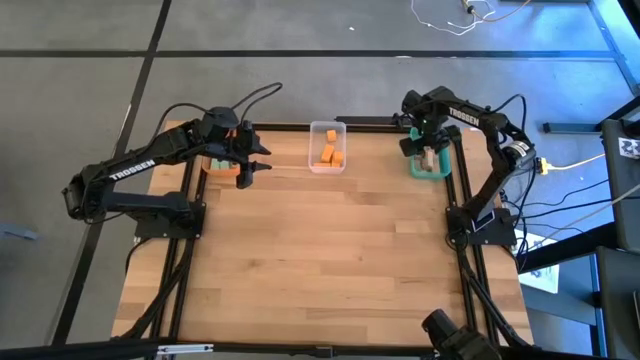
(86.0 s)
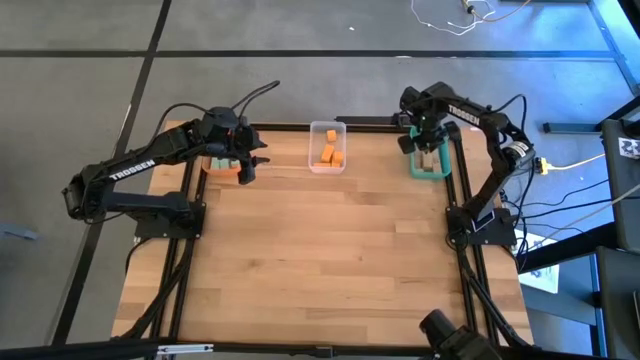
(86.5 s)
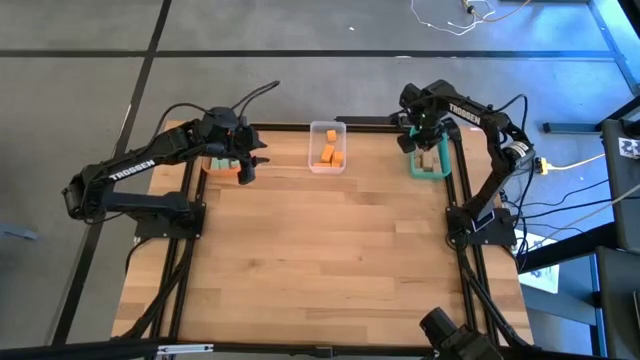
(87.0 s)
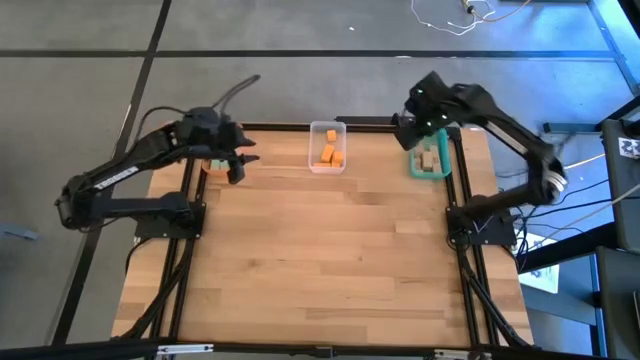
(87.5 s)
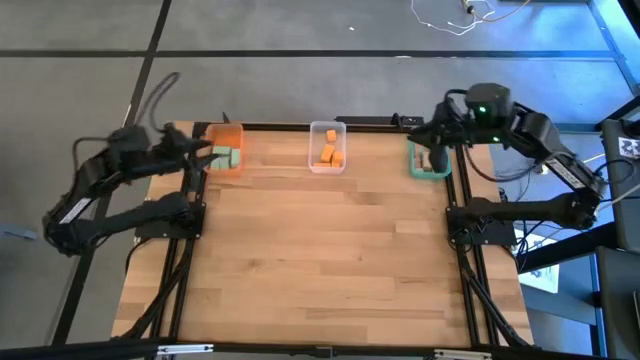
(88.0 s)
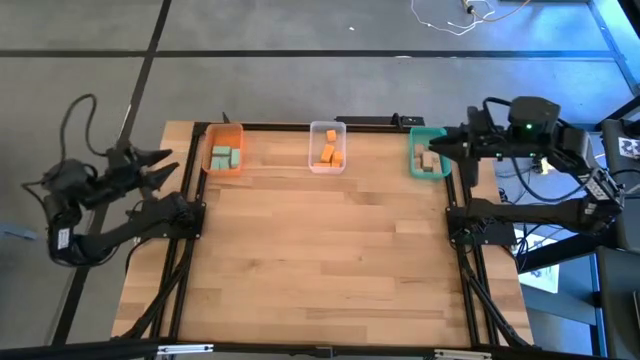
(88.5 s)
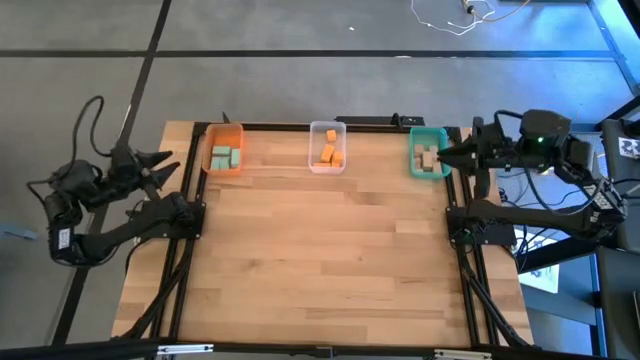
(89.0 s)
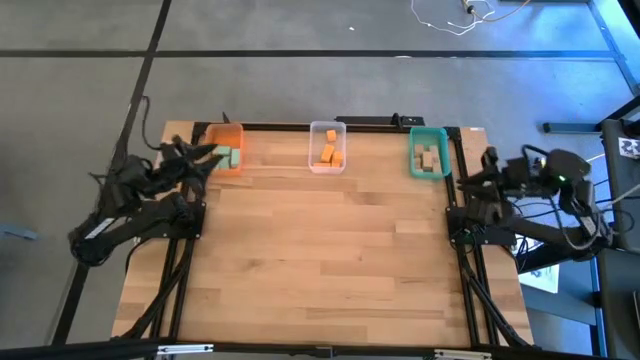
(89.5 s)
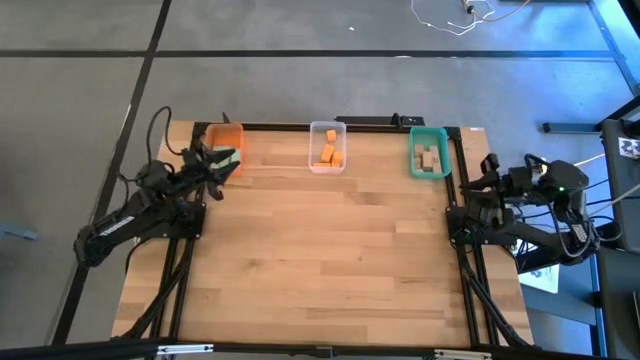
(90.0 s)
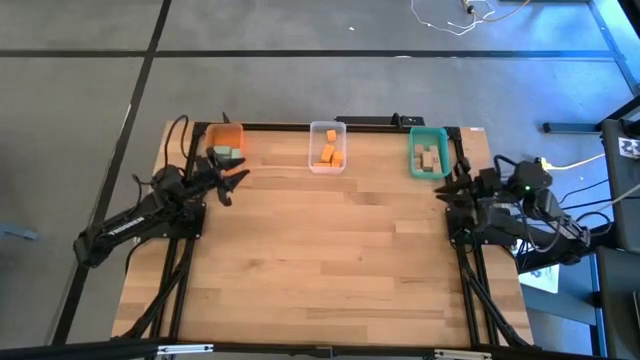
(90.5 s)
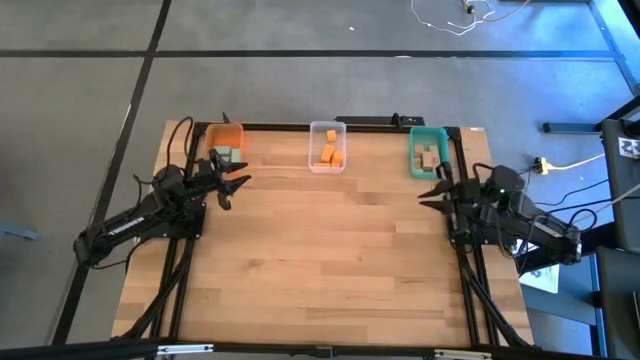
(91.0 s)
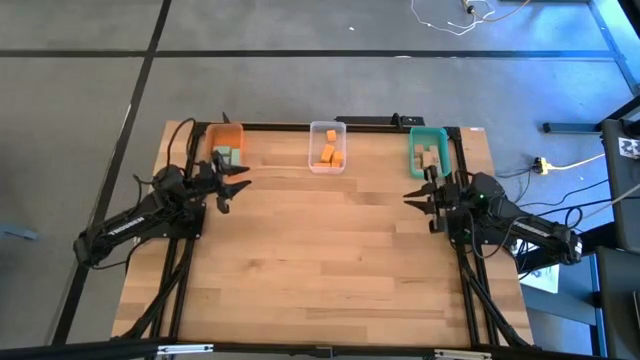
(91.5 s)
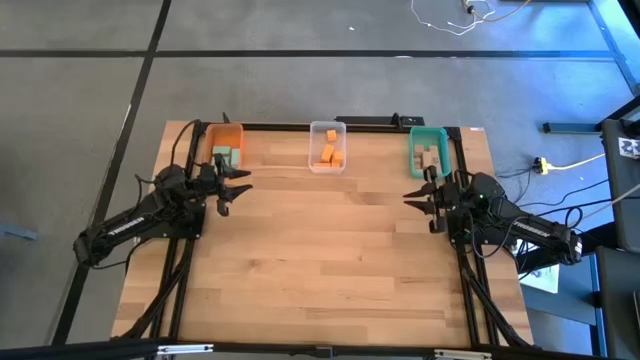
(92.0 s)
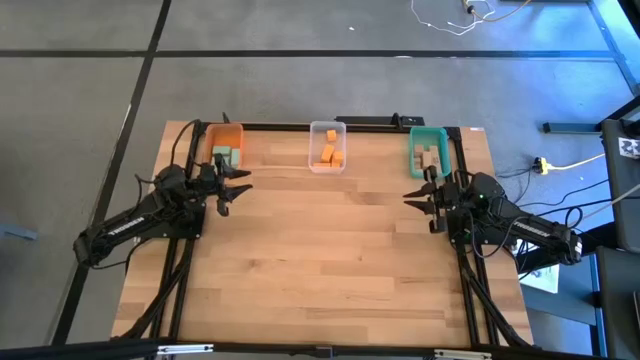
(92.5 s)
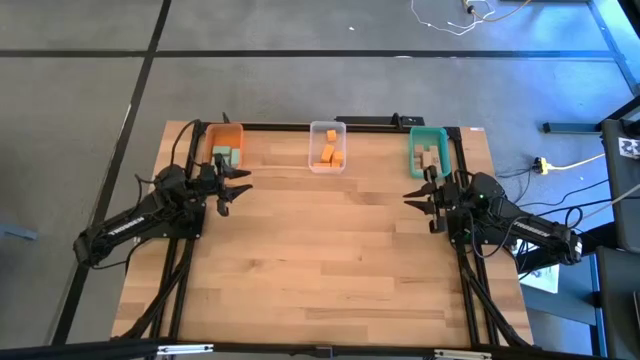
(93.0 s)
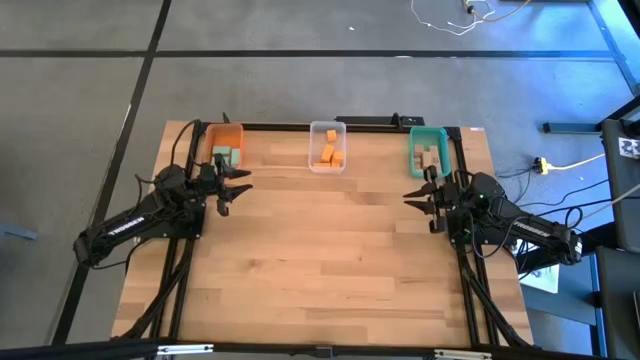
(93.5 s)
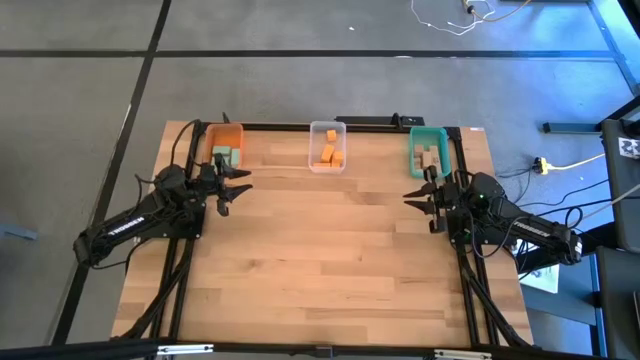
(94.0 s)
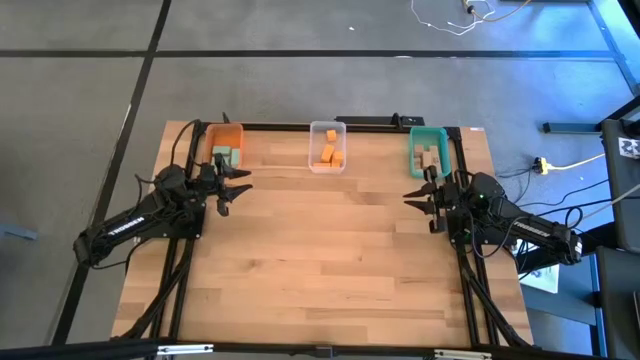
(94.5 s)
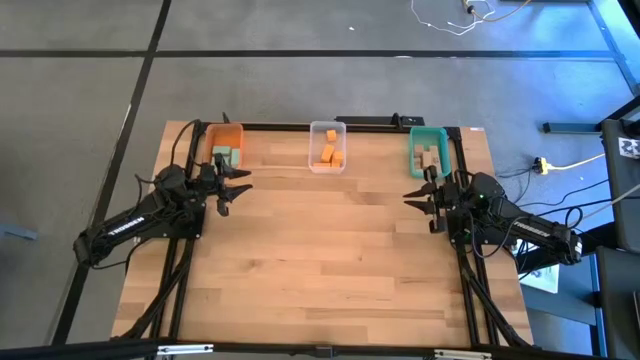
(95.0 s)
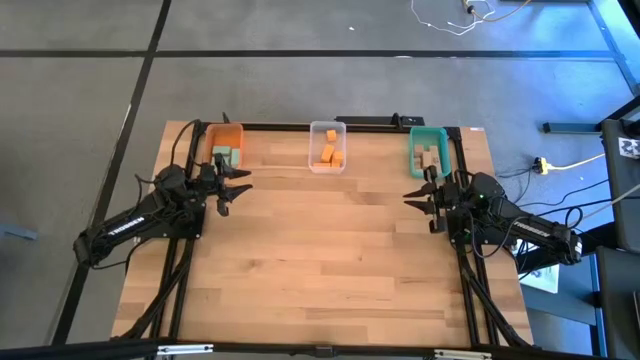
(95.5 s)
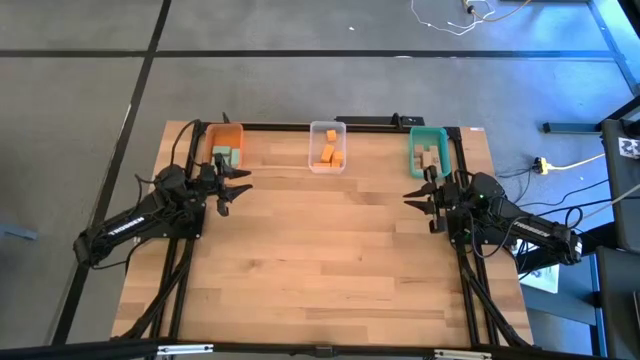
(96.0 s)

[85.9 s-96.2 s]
Task: Sort & place blocks by color
Return to home position

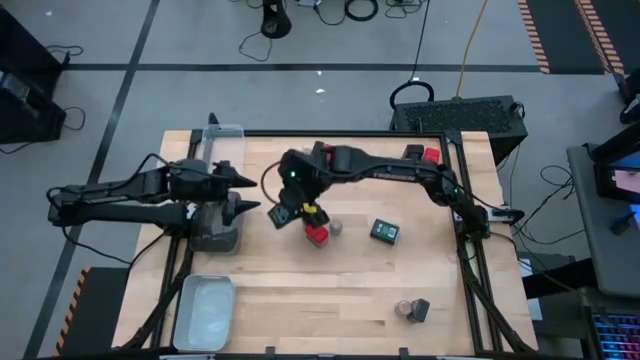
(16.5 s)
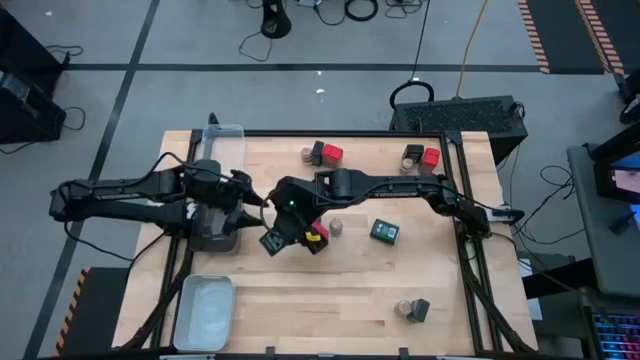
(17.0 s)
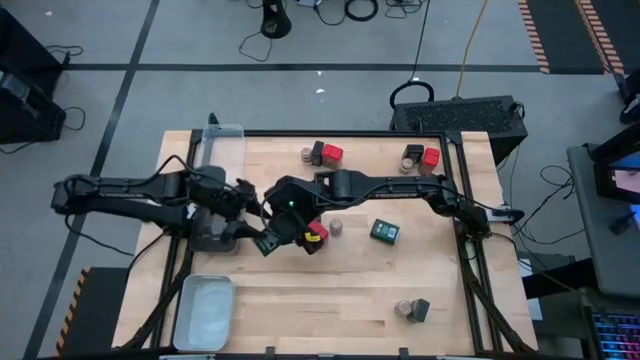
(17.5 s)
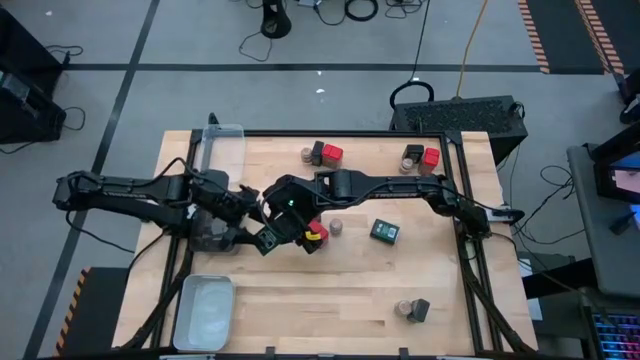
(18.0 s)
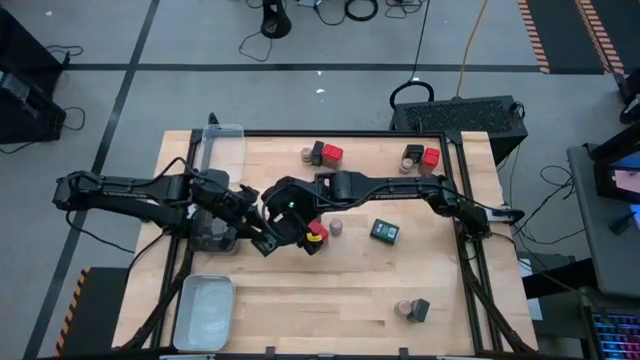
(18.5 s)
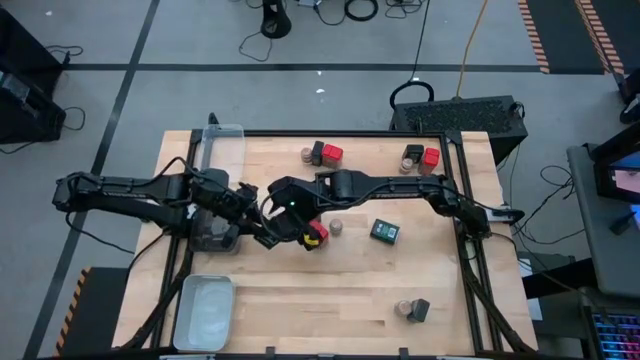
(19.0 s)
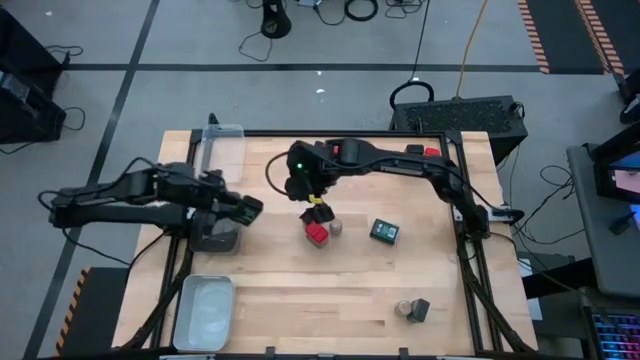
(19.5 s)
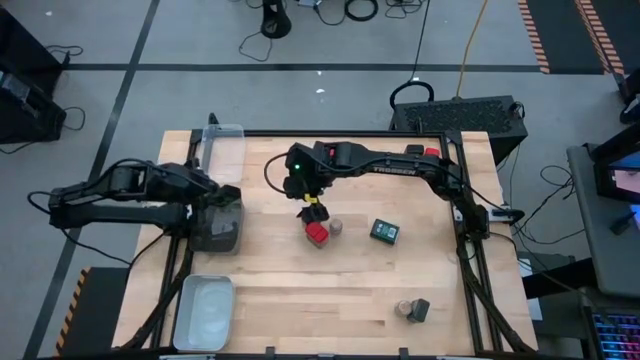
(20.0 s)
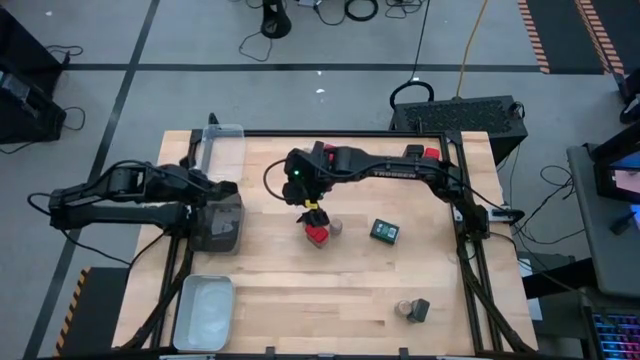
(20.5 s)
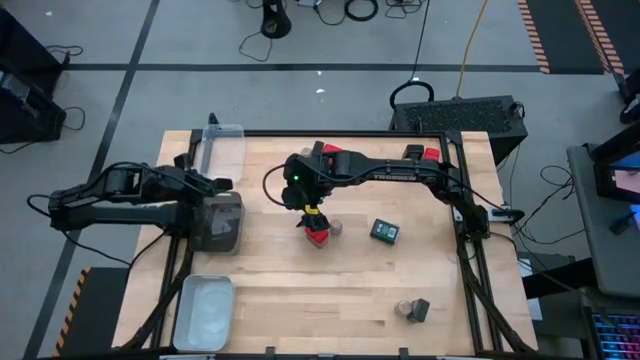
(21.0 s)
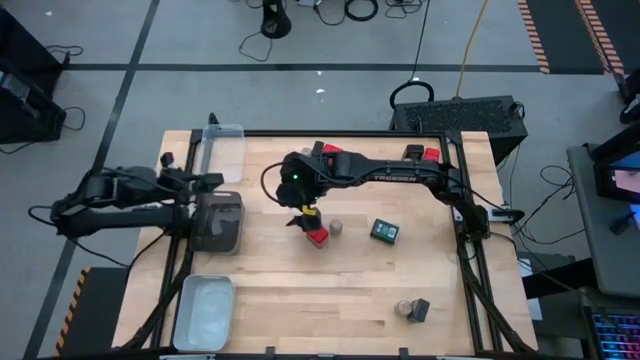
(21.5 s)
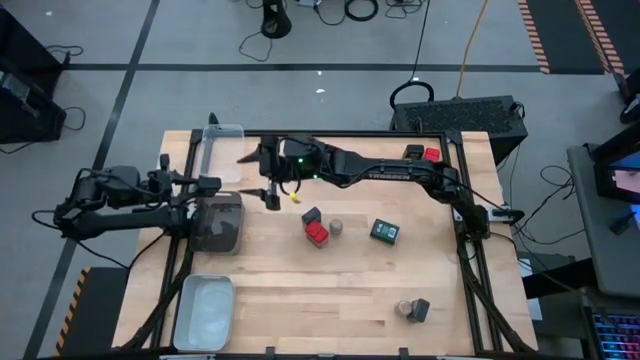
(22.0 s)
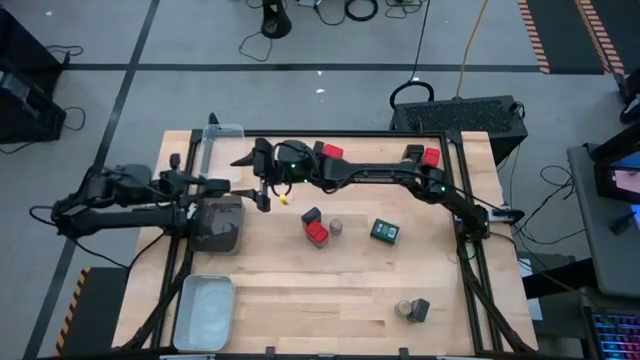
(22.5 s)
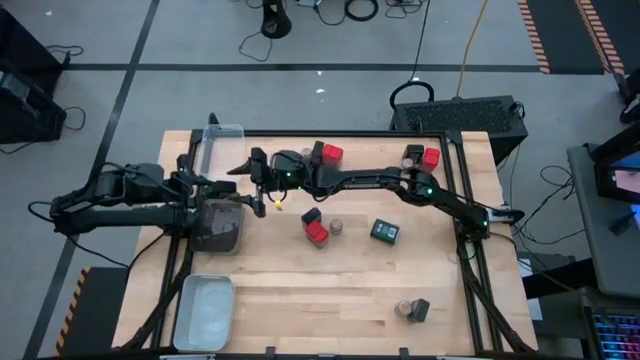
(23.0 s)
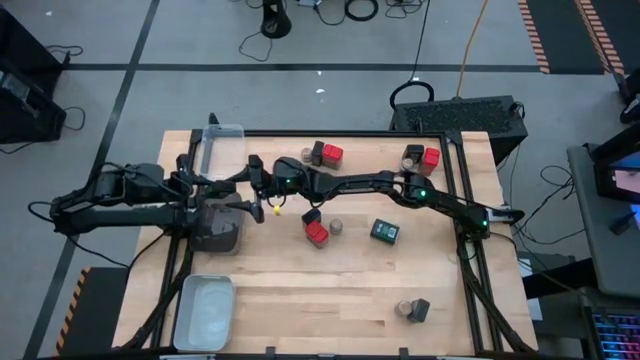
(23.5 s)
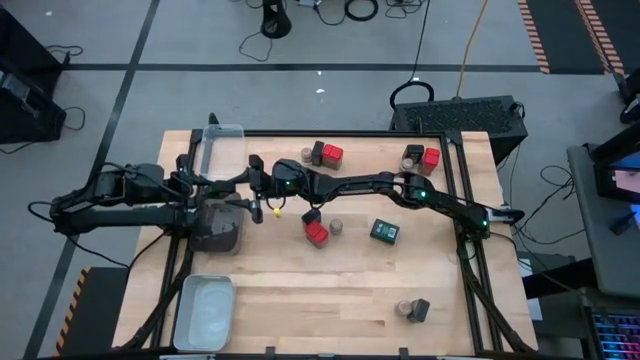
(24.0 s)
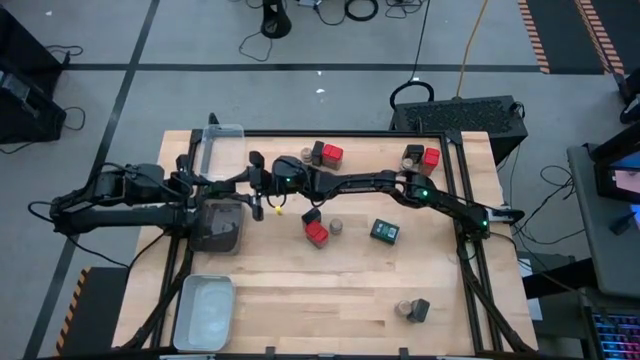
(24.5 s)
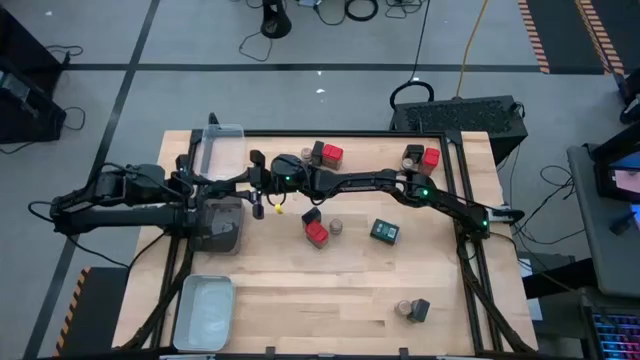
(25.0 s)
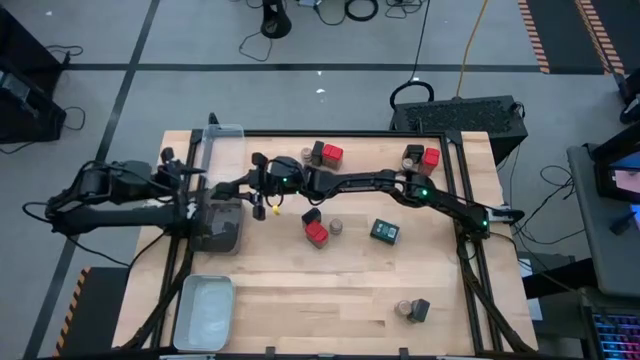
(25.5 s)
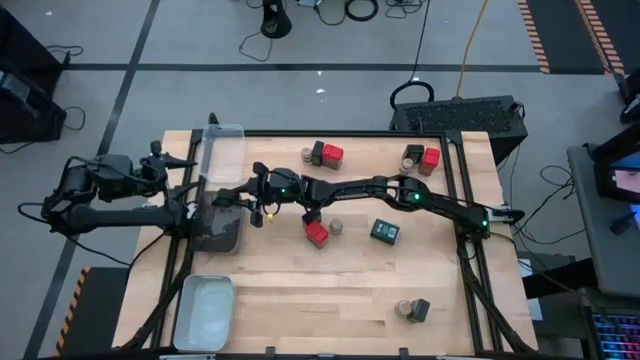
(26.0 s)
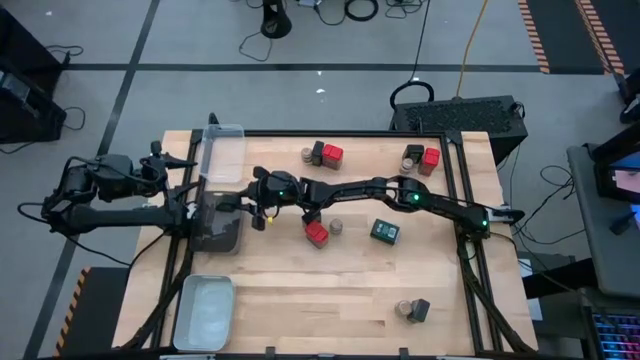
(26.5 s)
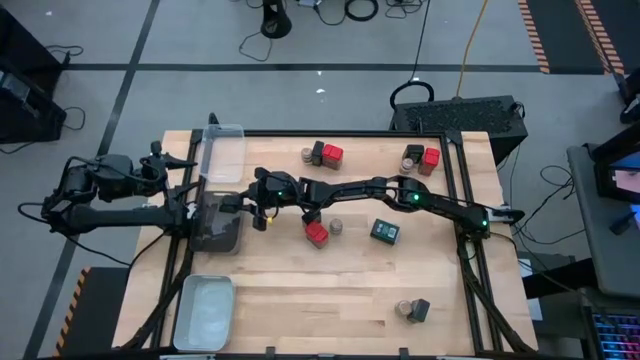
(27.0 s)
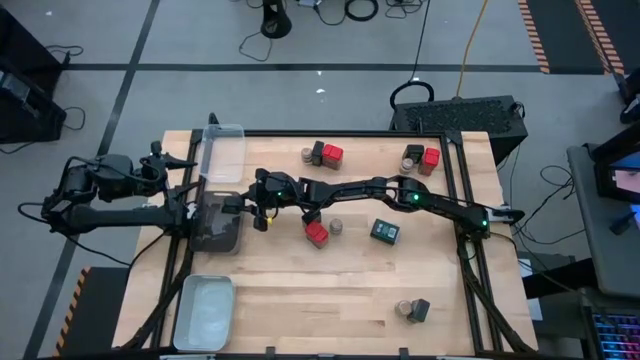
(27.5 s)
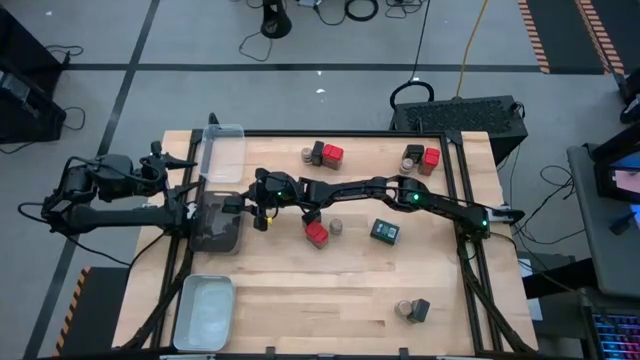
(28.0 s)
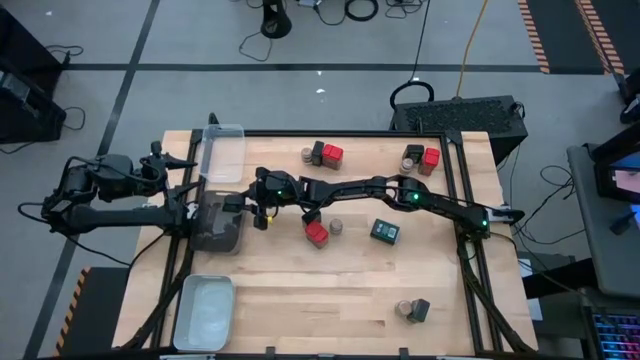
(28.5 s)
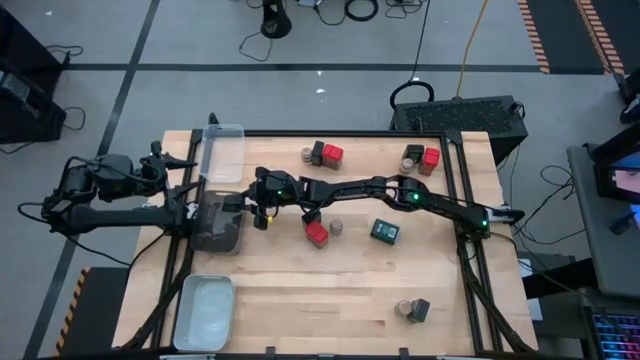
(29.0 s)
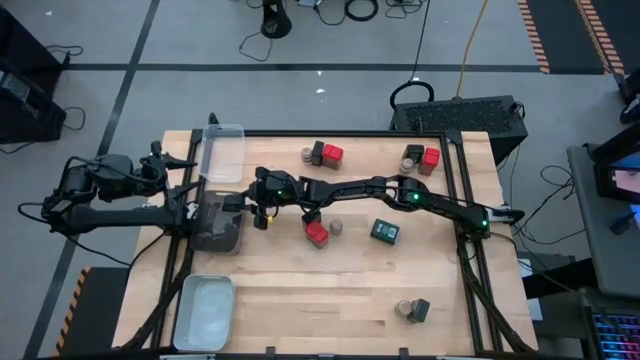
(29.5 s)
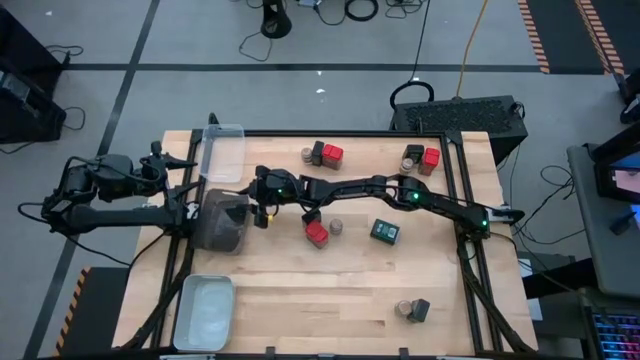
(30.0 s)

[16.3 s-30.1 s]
Task: Sort spices by type
Put the black seasoning can into the black bin
